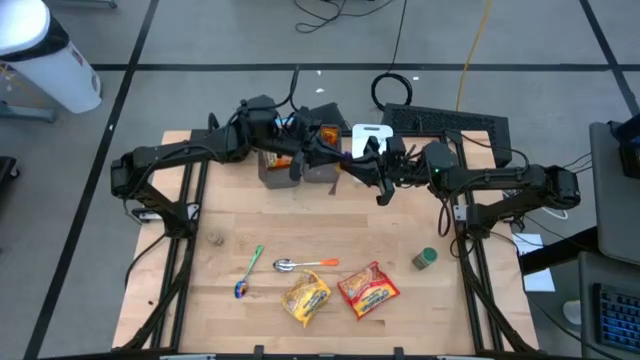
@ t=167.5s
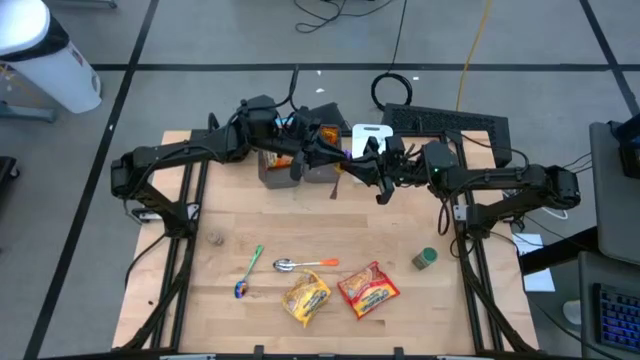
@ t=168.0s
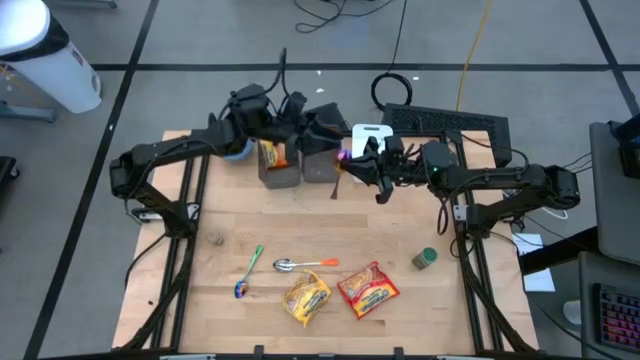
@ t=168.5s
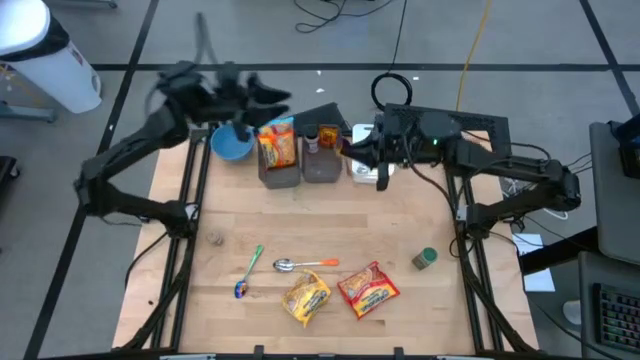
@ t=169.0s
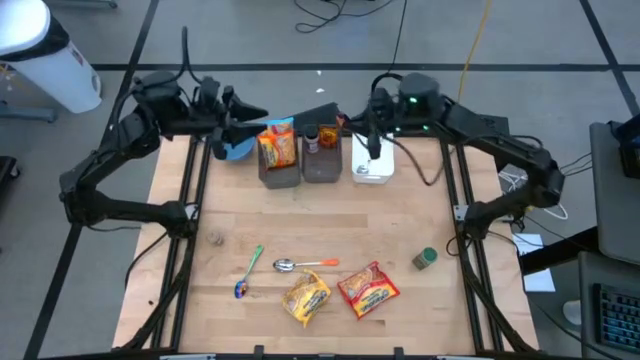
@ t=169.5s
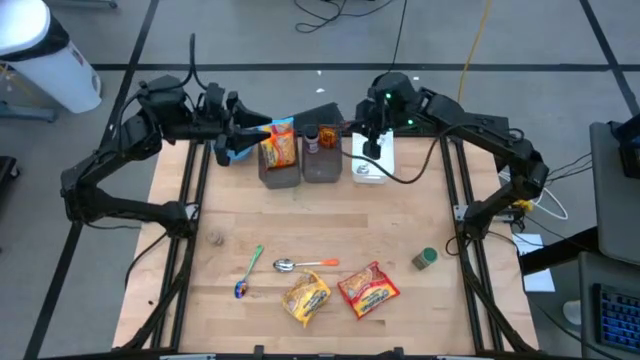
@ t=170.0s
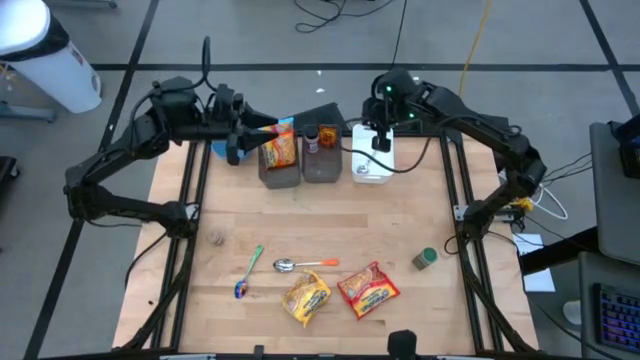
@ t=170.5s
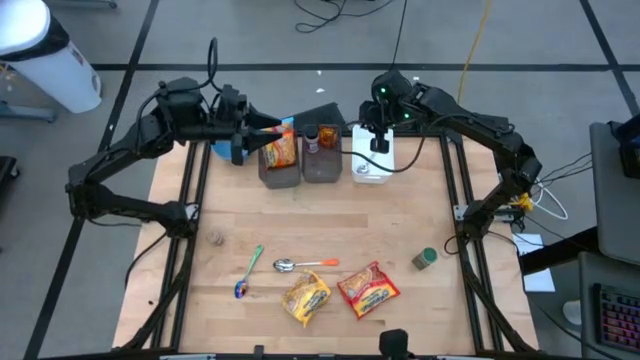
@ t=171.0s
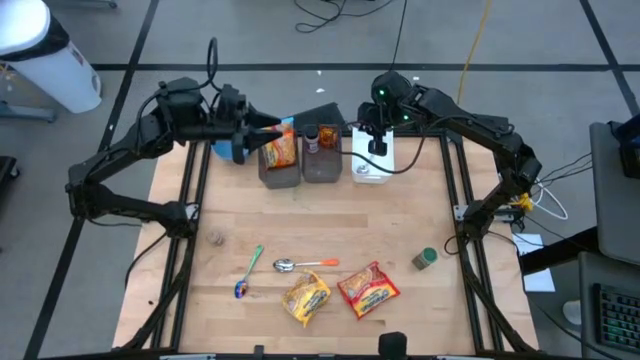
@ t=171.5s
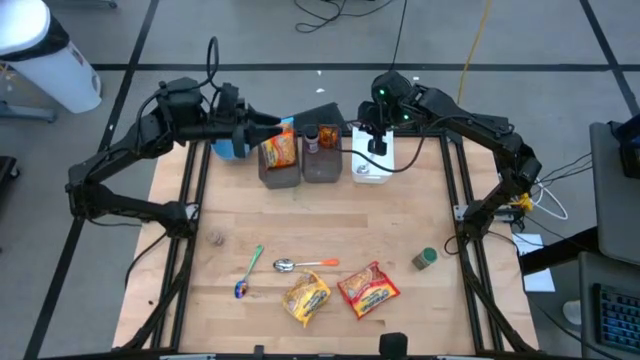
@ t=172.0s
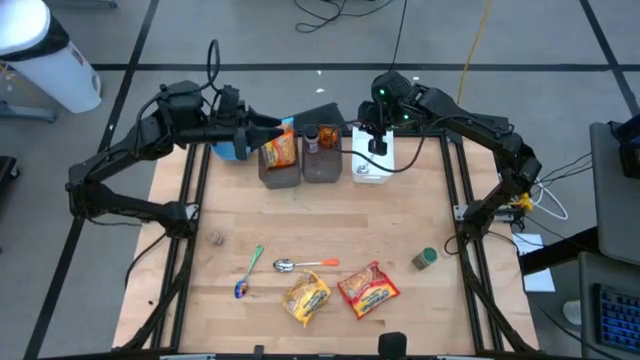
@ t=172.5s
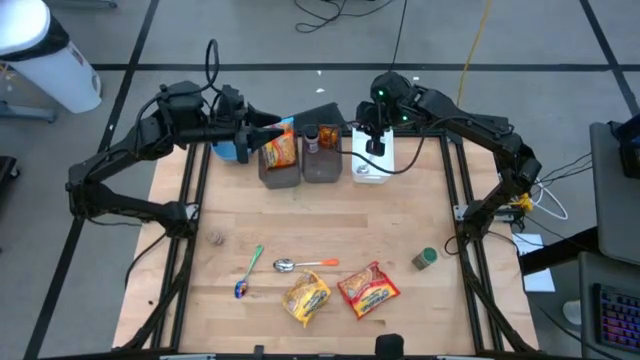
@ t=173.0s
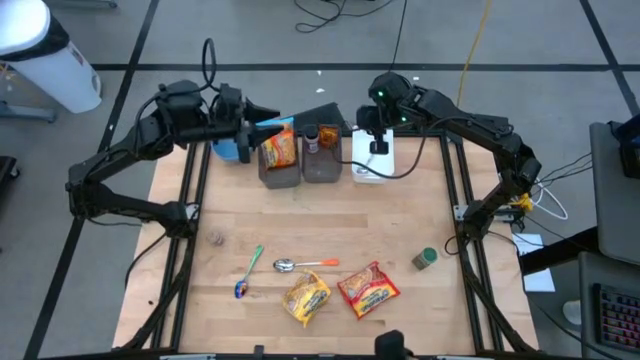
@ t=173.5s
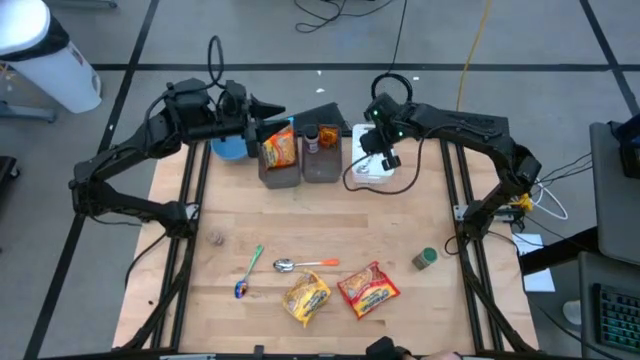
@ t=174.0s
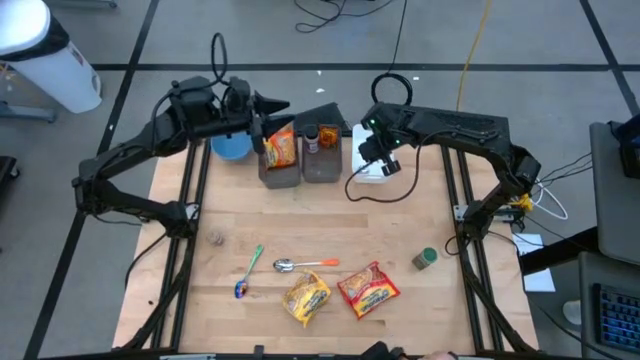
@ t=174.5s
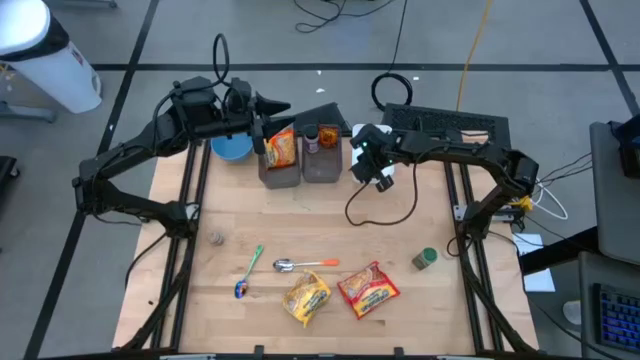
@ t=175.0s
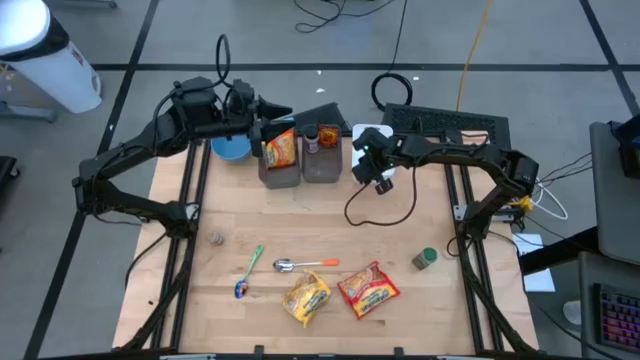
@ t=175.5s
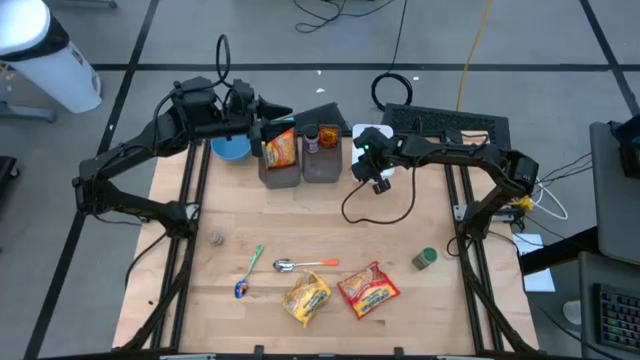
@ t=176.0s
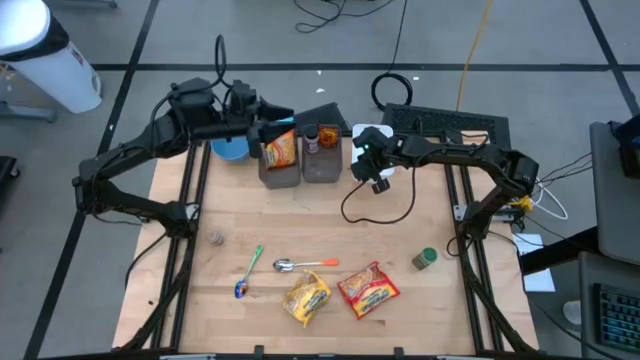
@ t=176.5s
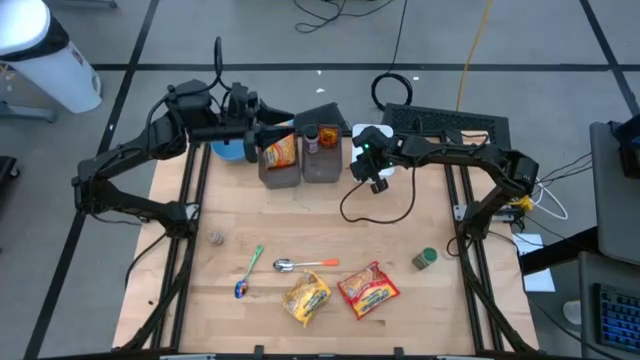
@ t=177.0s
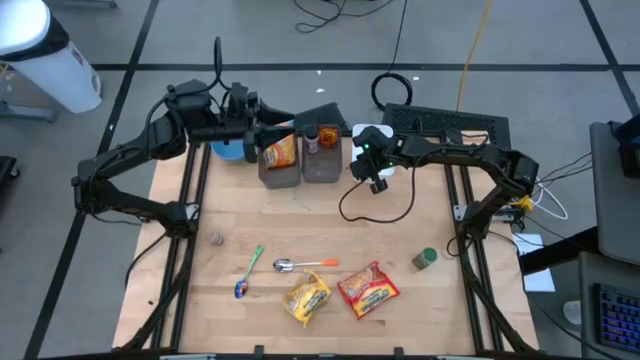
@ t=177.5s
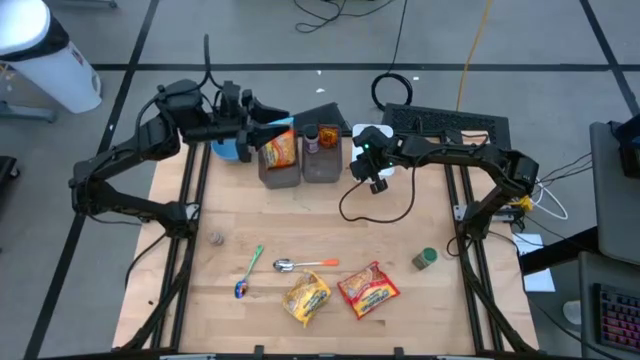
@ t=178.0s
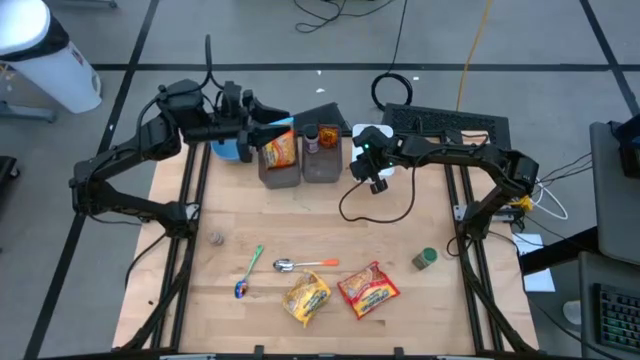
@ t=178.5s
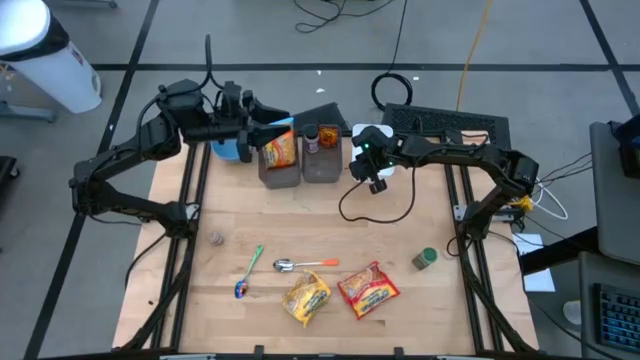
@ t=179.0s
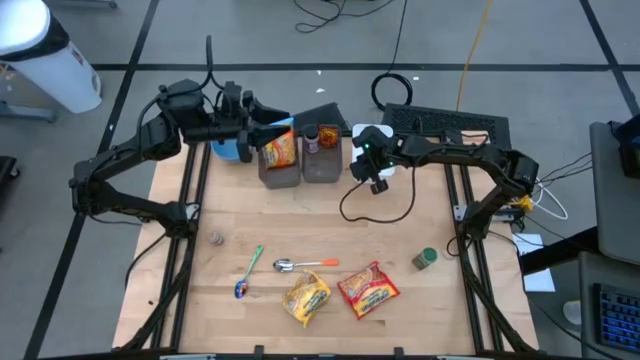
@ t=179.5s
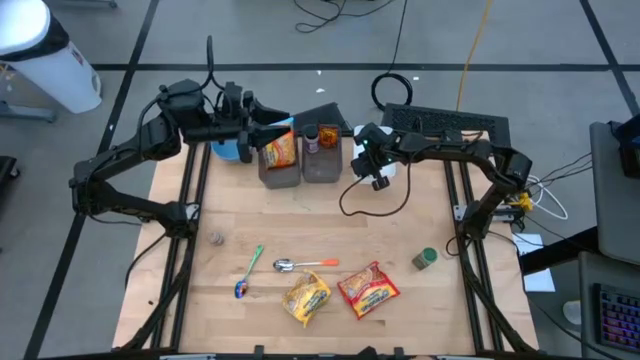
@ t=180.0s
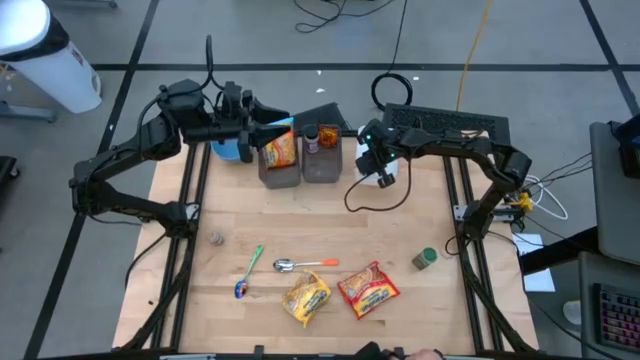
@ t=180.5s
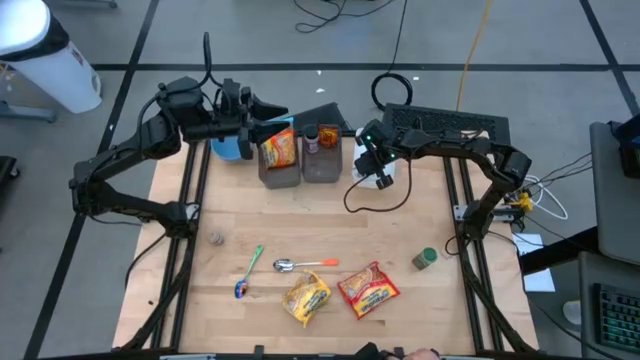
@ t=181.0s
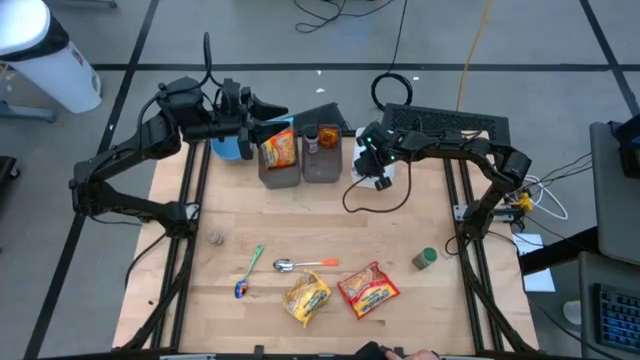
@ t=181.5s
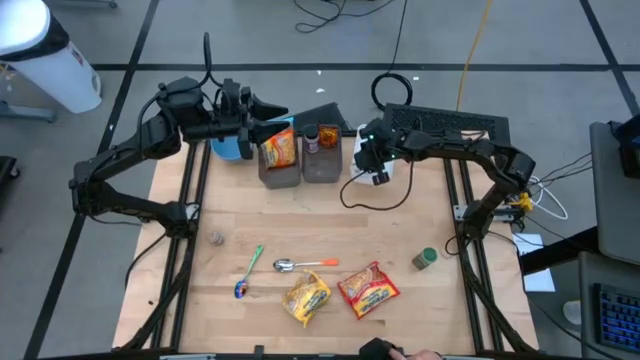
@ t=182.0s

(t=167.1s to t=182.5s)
Task: Pick & Place Food Item
Put the right blue green spoon into the white bin

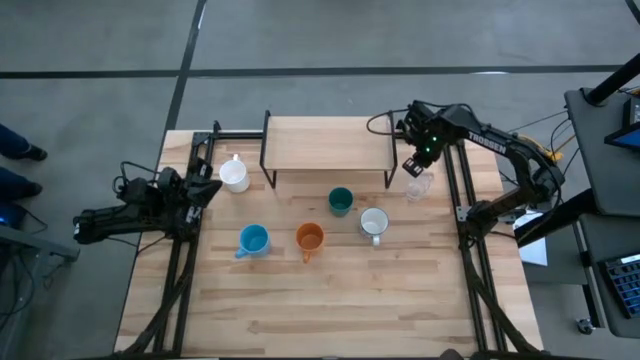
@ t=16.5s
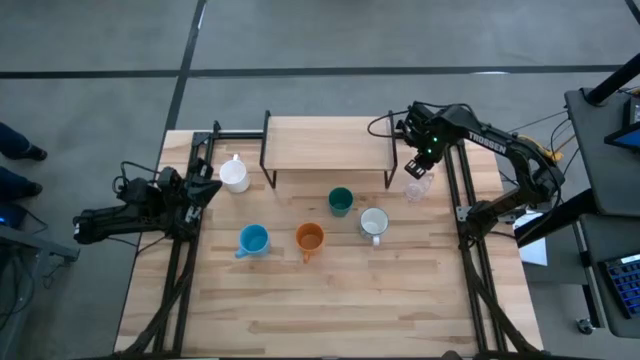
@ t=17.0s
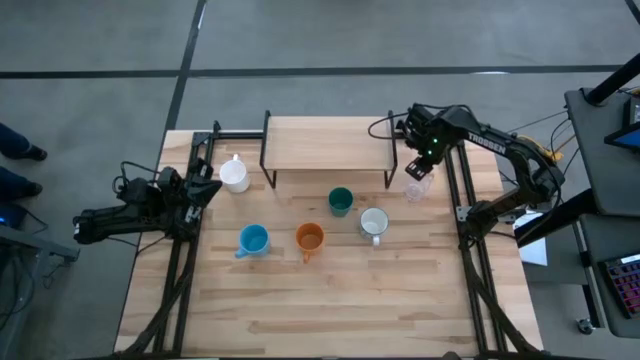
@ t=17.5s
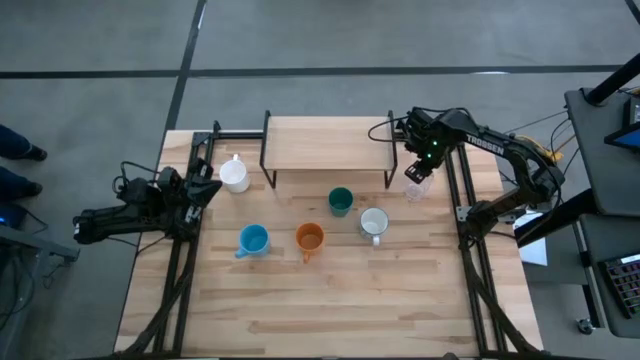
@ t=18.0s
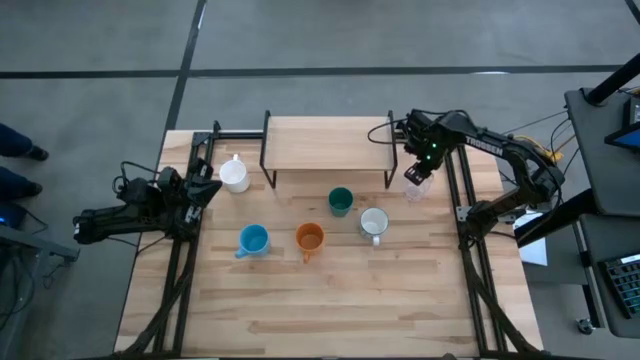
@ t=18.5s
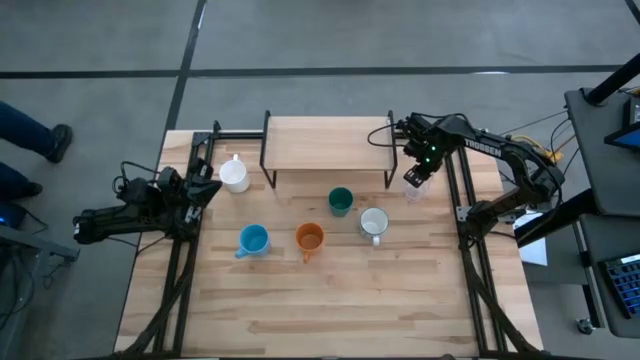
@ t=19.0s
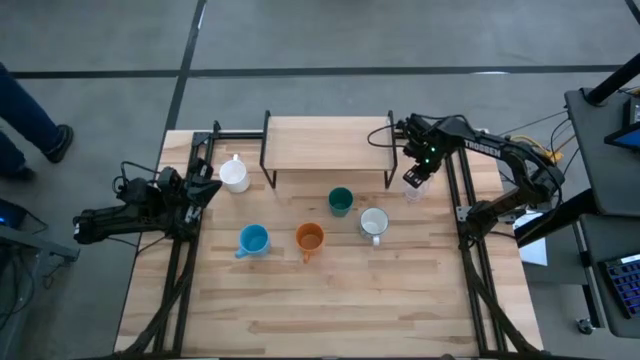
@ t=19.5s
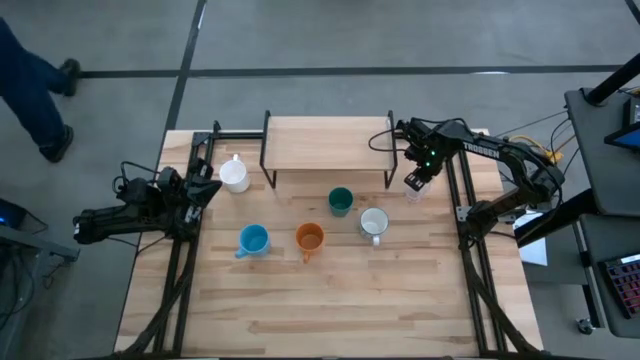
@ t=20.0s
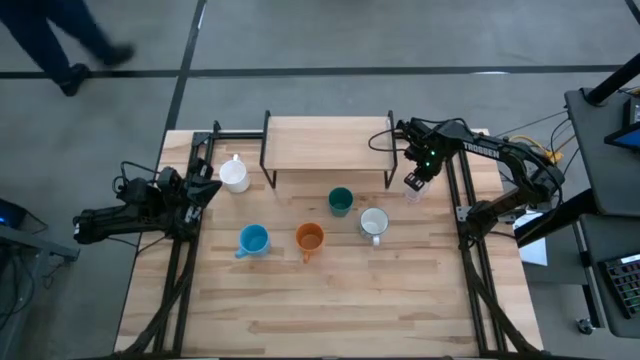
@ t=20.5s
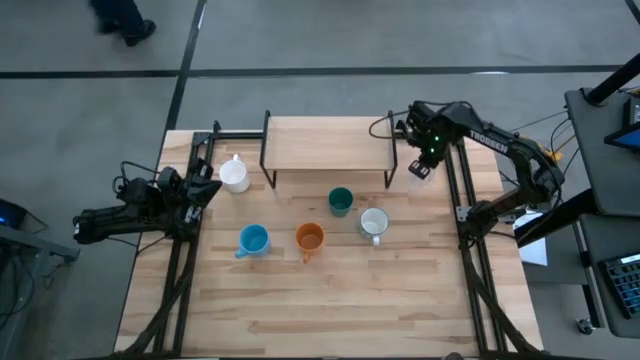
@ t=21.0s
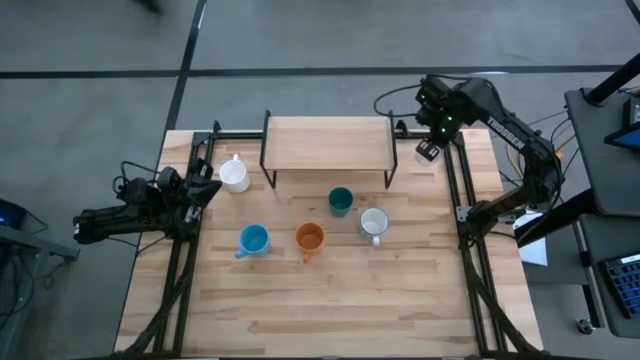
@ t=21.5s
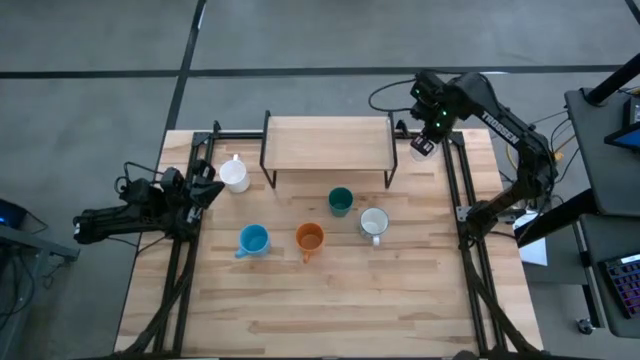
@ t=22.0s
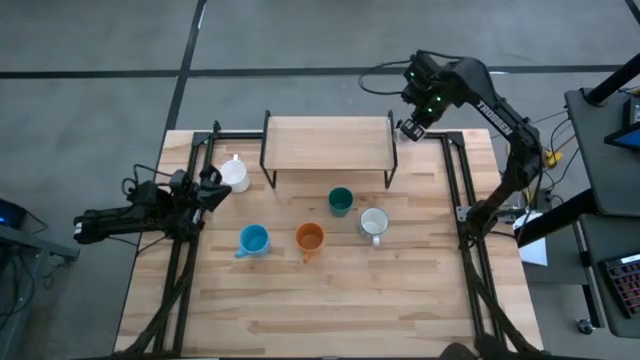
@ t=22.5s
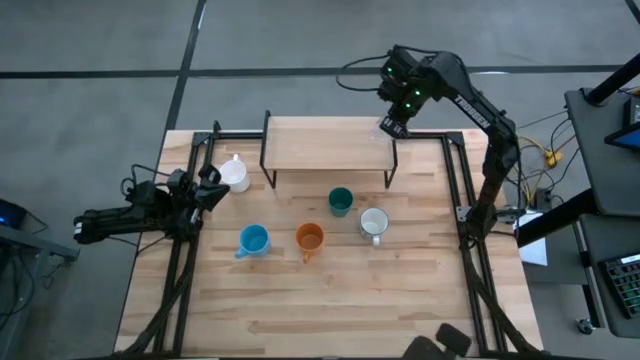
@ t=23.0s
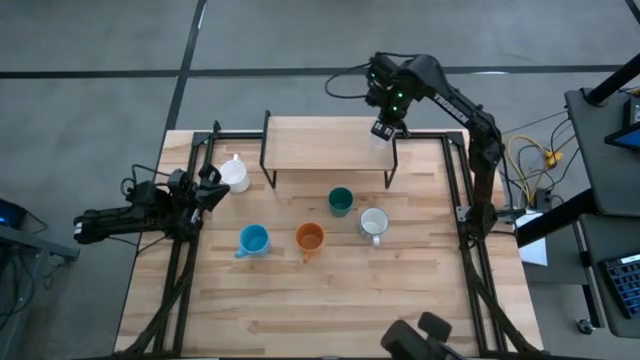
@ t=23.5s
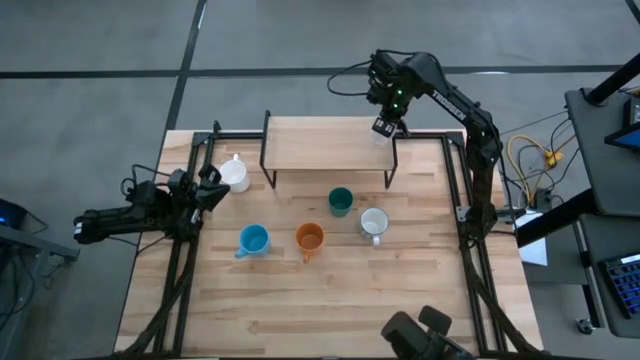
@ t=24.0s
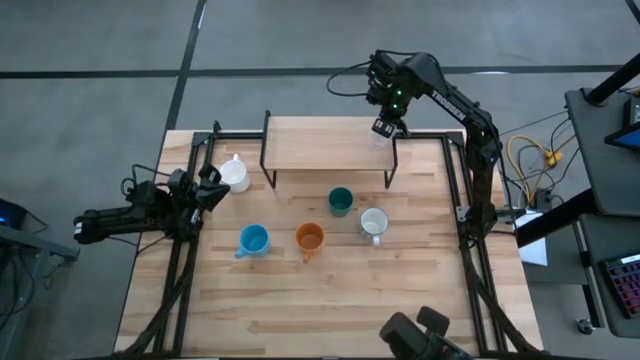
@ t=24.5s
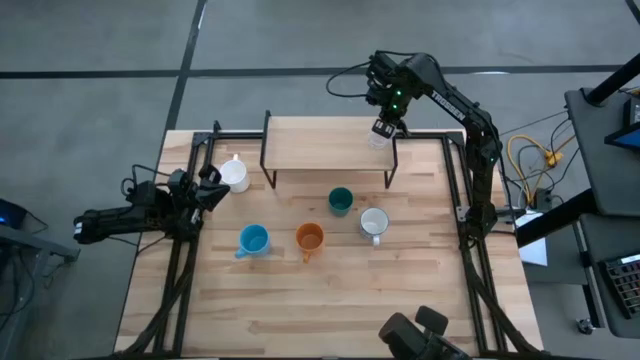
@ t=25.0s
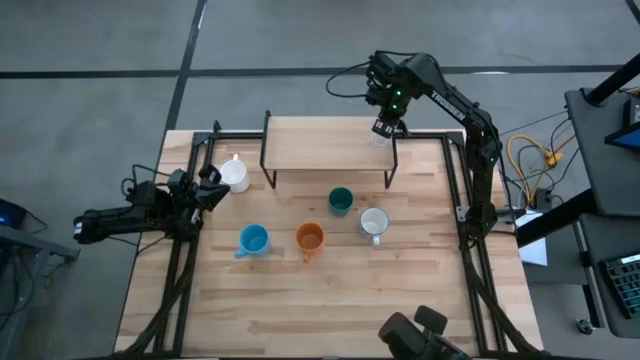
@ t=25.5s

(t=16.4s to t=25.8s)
Task: Stack small to large cups/mugs on shelf
Put the transparent mug on the shelf
